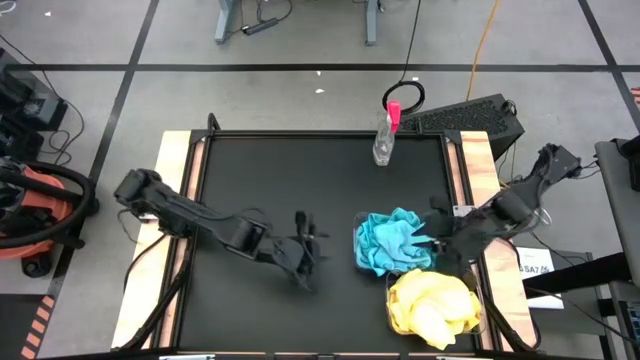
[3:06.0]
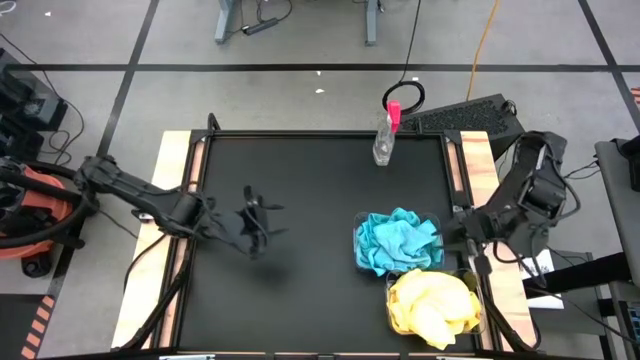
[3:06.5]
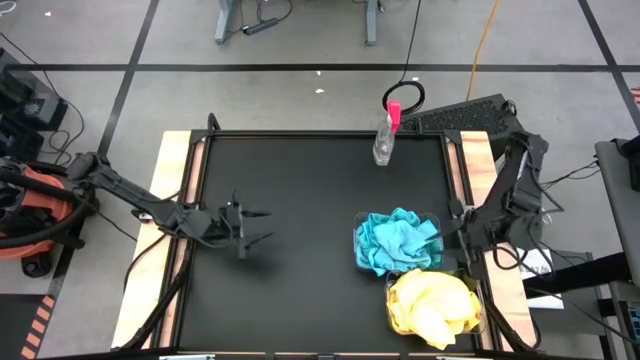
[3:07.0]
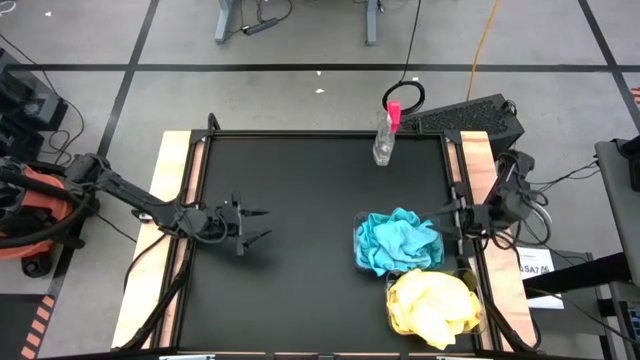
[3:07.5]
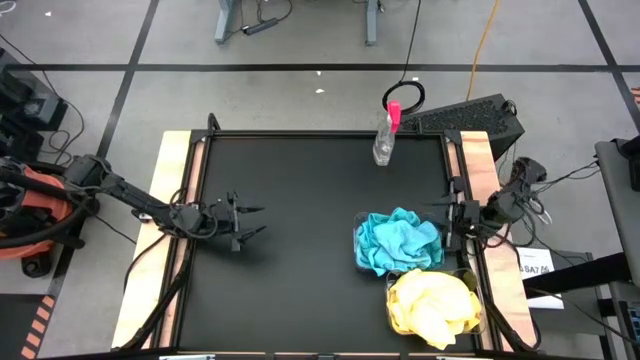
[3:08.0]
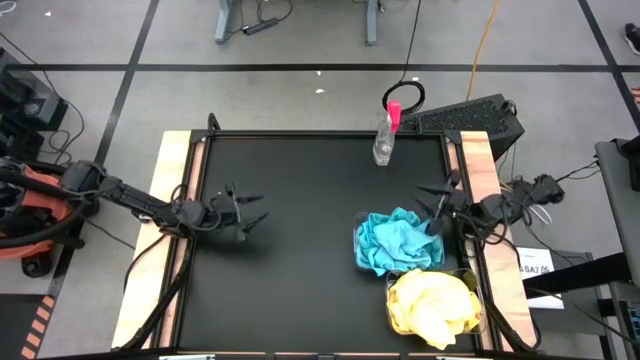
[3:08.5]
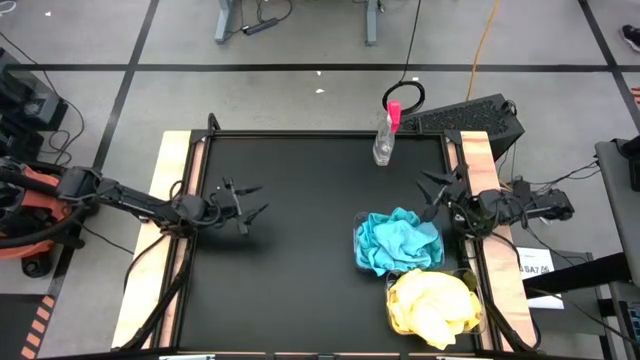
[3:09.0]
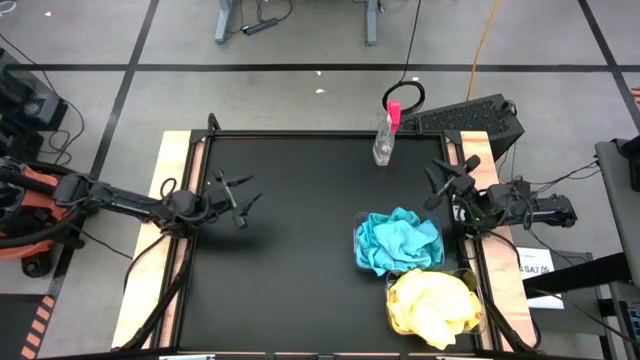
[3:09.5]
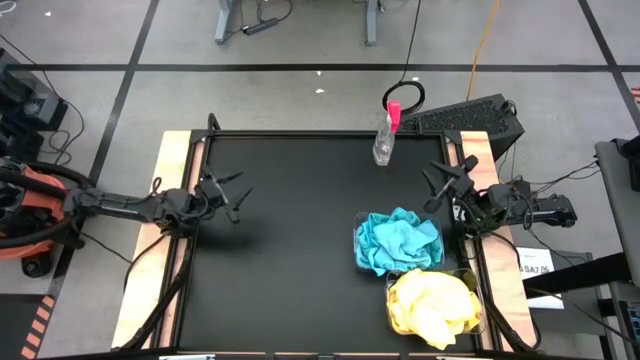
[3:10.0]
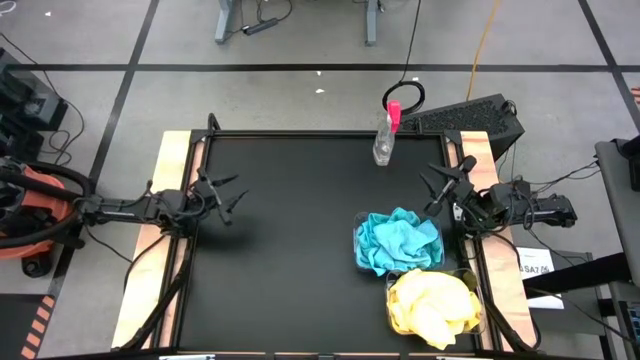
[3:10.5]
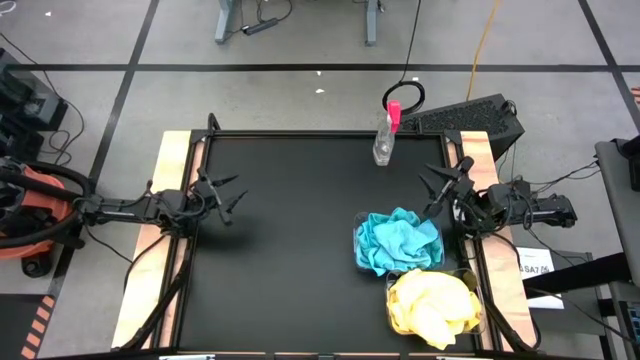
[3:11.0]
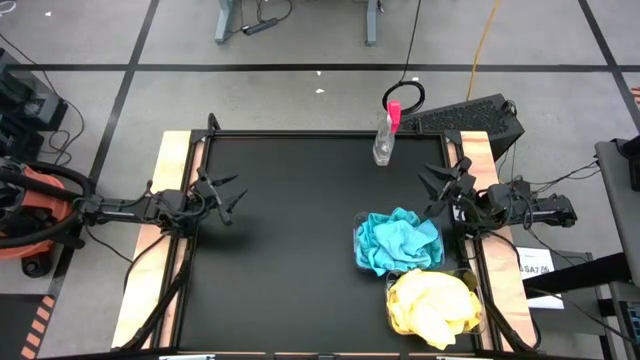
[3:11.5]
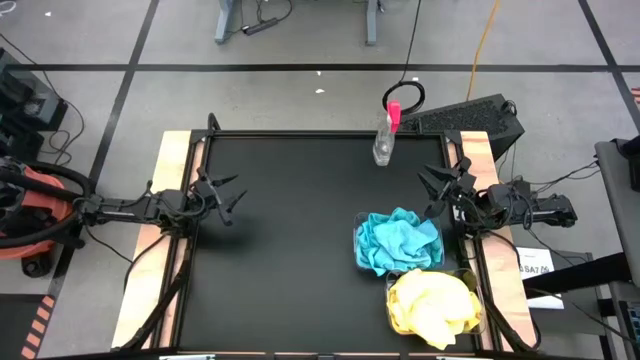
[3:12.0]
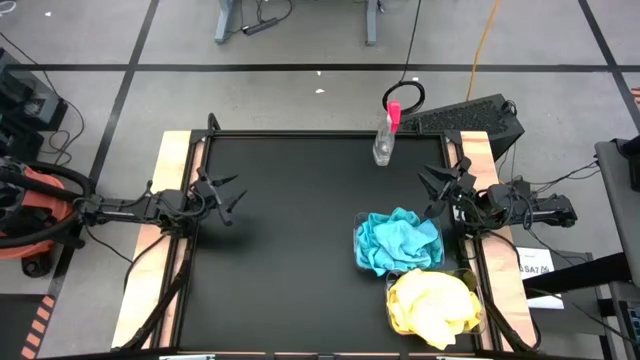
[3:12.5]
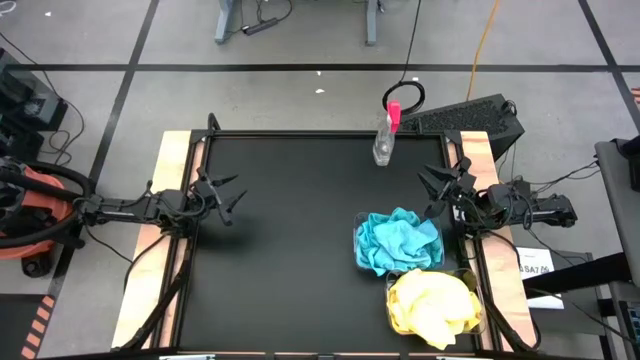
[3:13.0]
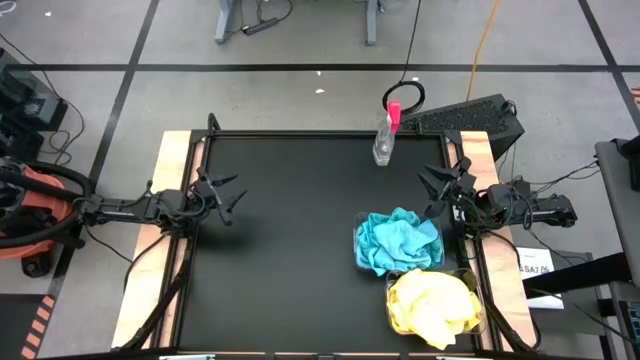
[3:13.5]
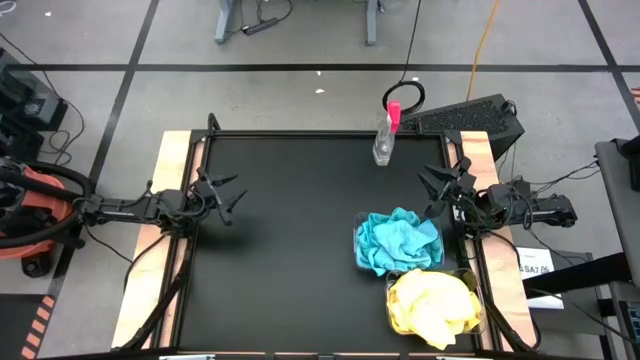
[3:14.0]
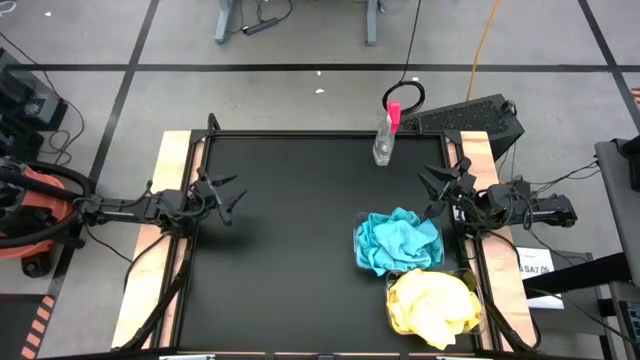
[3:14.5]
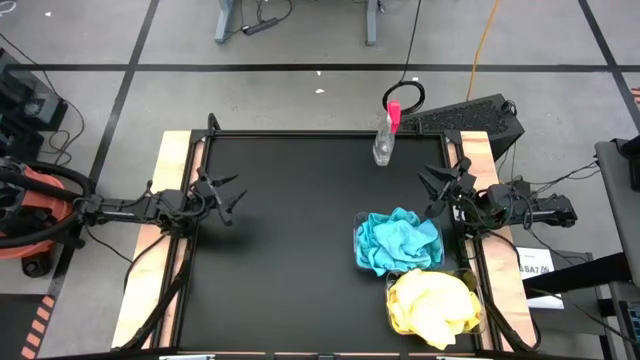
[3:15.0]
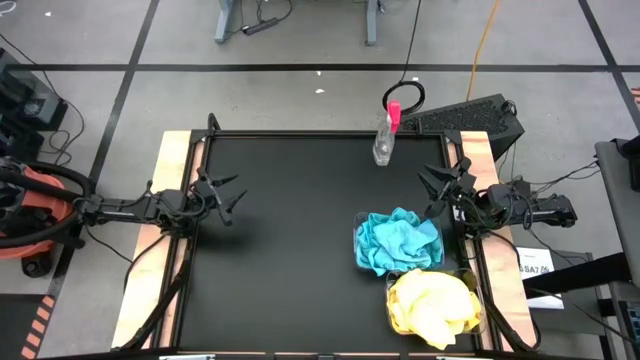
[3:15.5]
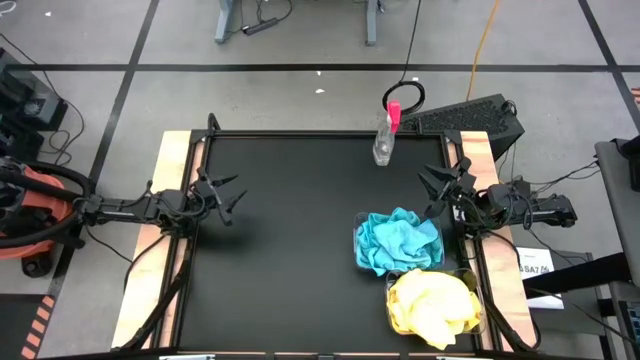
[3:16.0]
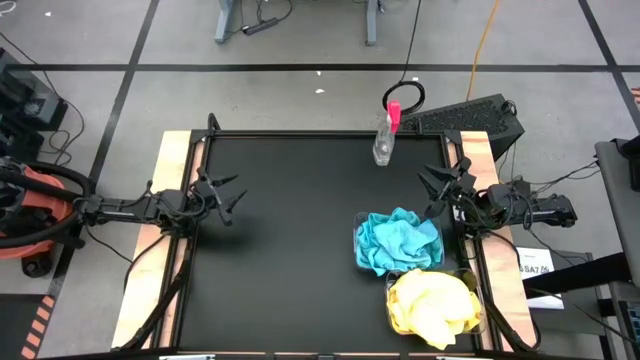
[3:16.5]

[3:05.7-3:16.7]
Task: Sort microfiber towel by color & place in baskets
Return to Home Position

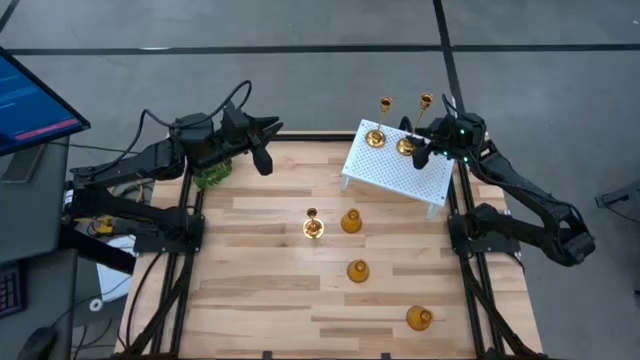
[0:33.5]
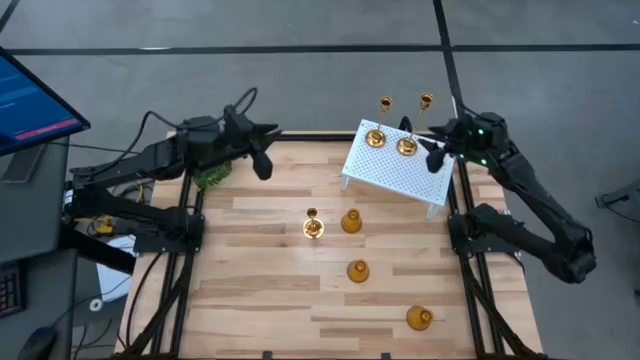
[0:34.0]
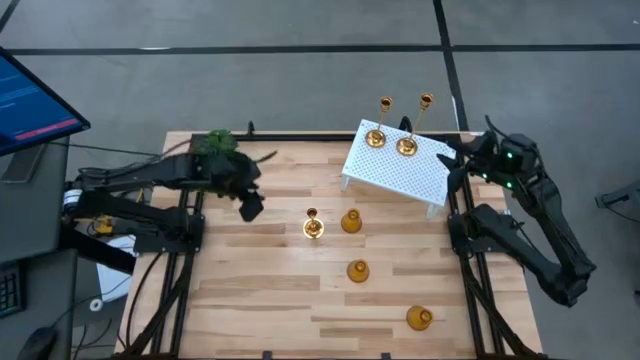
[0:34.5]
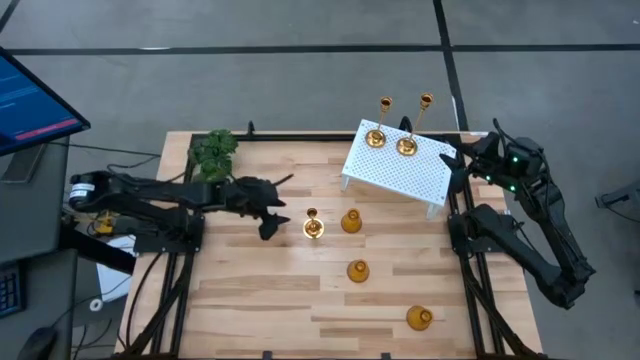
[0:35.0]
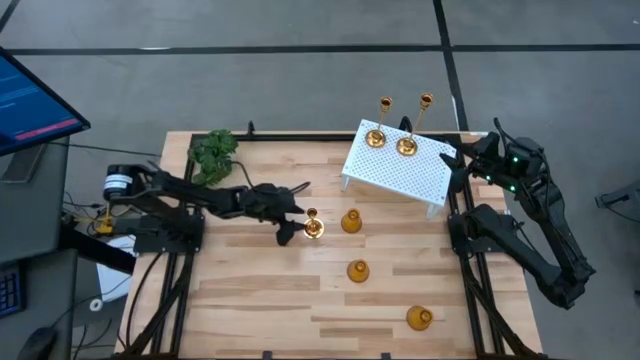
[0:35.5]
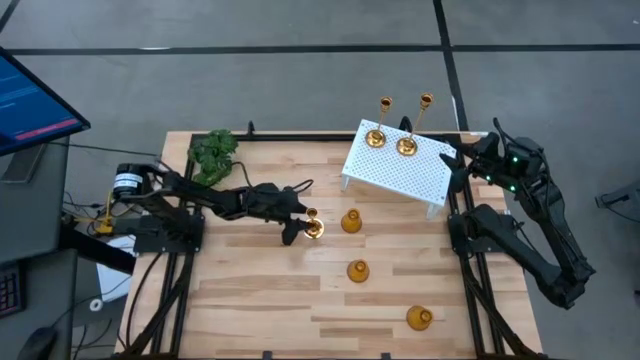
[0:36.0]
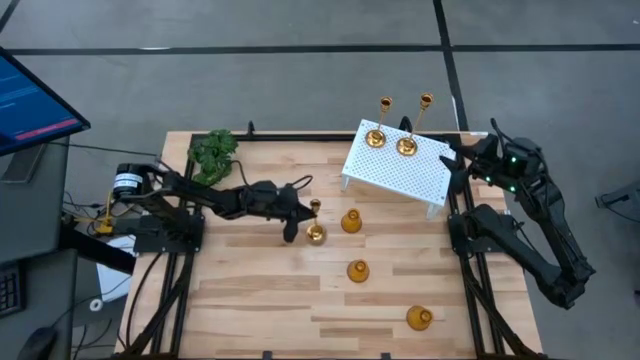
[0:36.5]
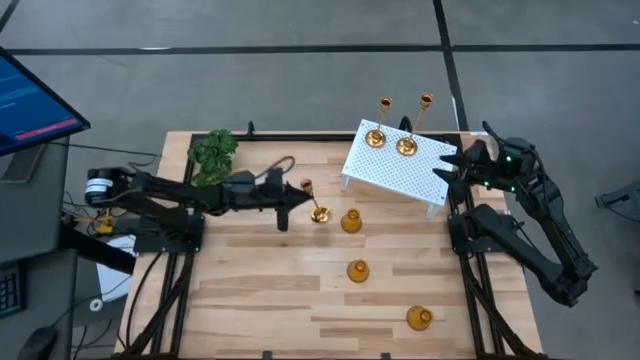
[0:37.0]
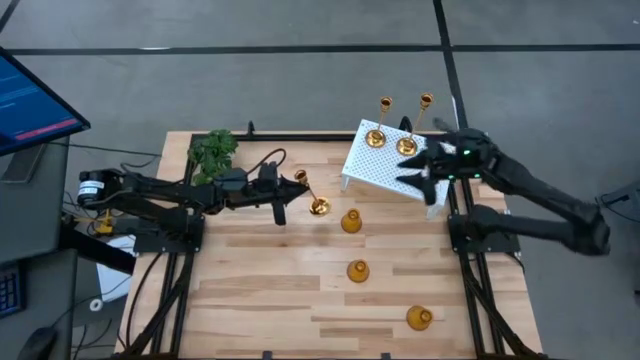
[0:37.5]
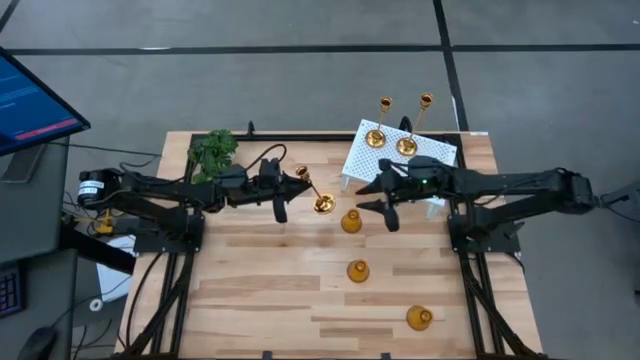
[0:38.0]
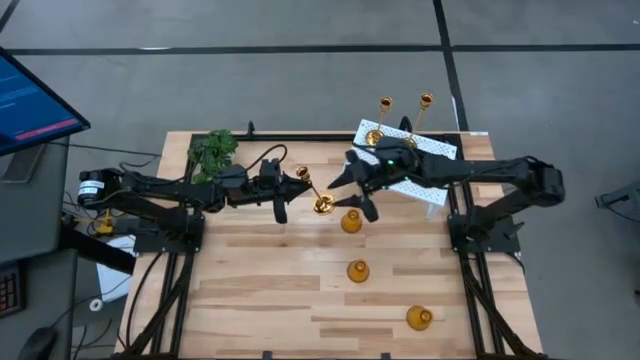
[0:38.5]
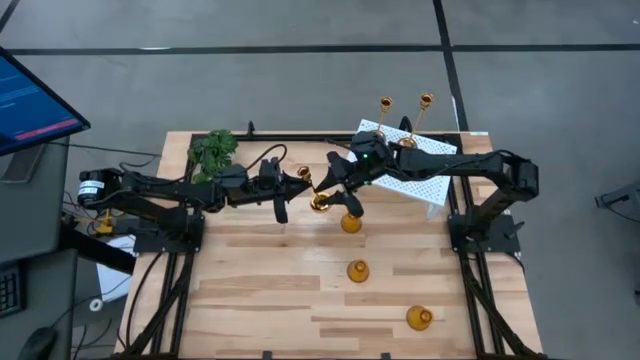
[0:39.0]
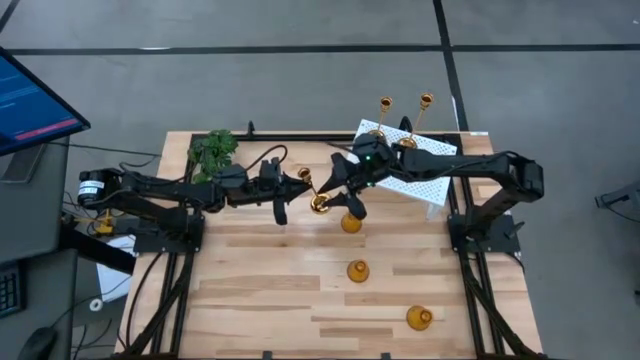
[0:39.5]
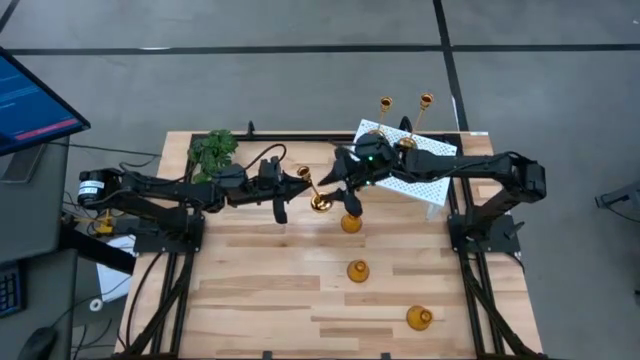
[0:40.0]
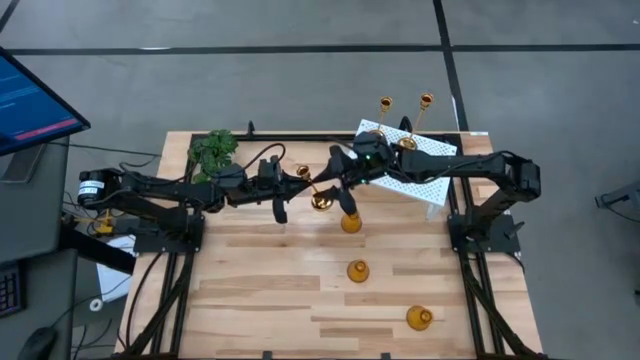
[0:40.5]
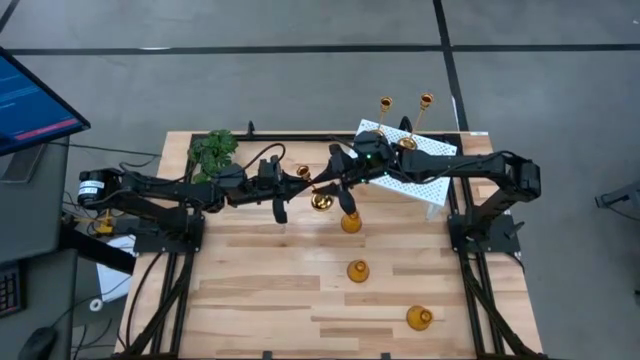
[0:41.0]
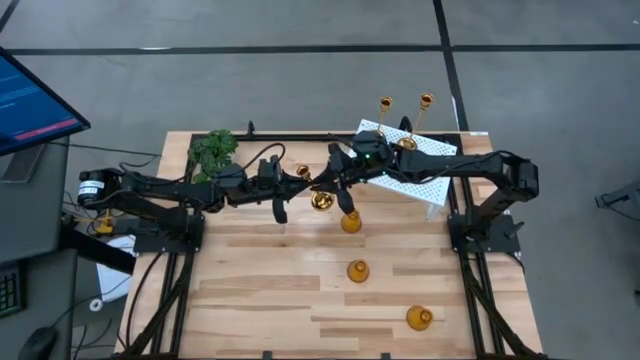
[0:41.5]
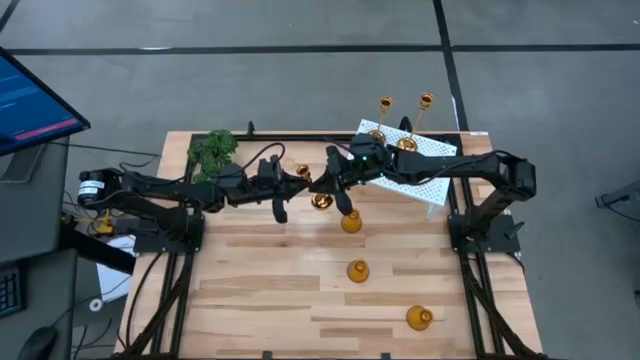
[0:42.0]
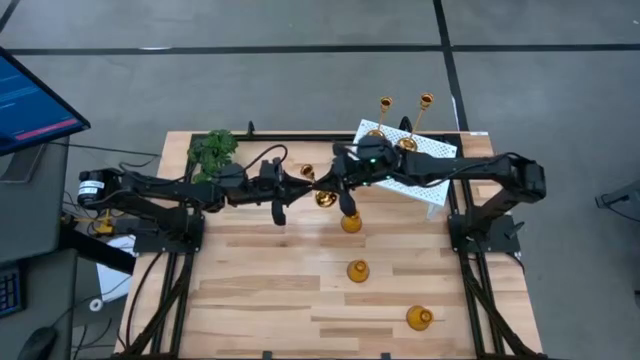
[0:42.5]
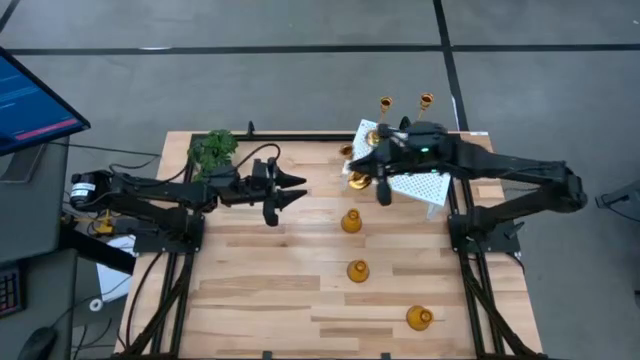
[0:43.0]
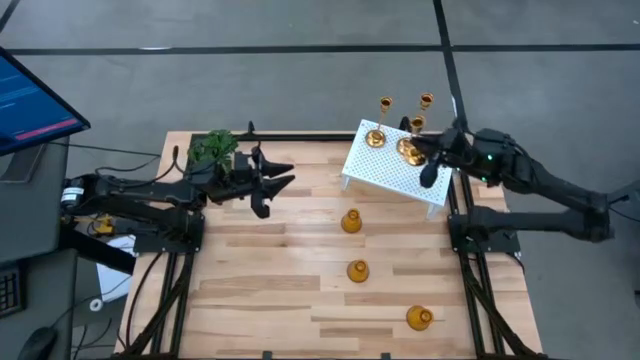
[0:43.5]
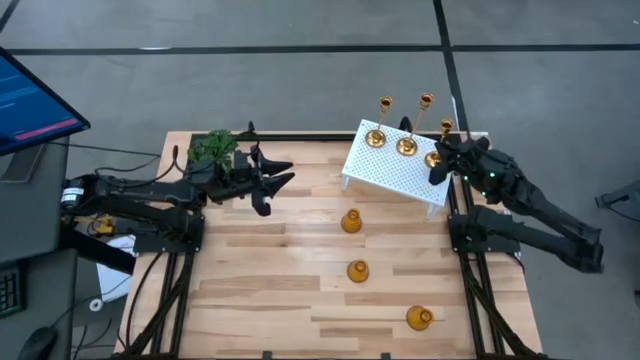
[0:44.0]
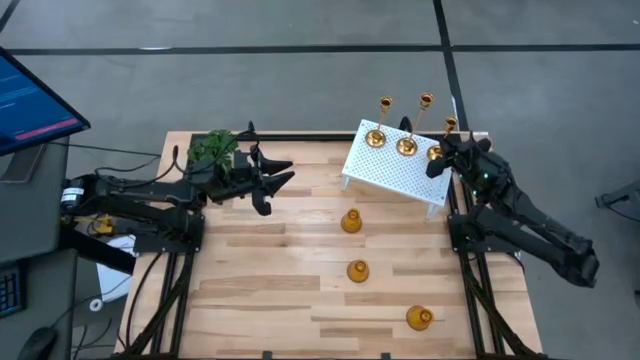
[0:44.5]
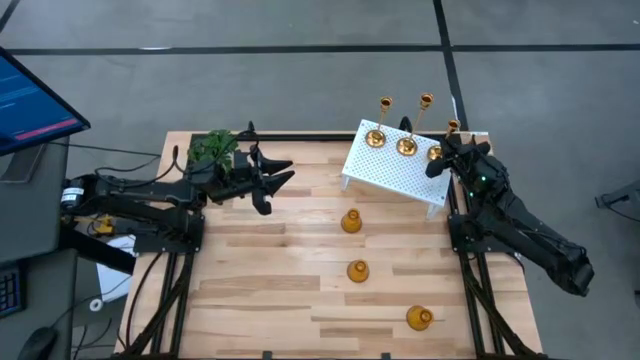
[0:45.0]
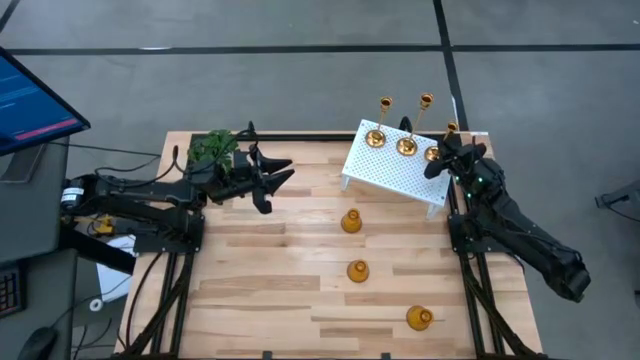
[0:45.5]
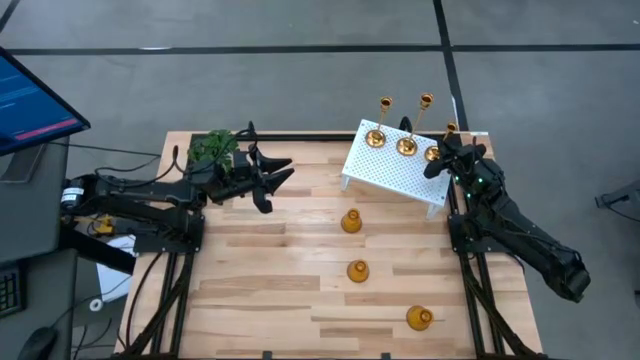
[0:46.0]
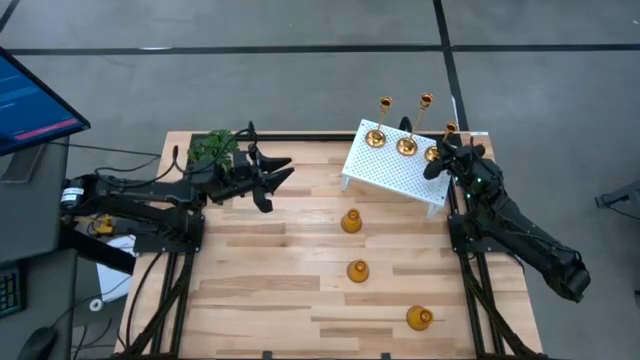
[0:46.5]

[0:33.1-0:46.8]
Task: Pick & Place candle stick holders
Put the gold candle holder on the shelf aligned with the other gold candle holders
